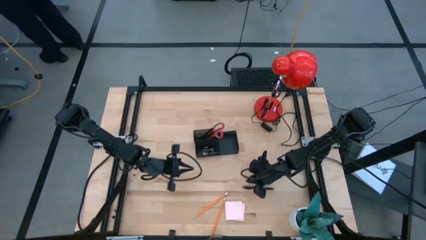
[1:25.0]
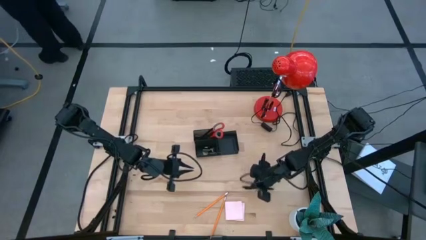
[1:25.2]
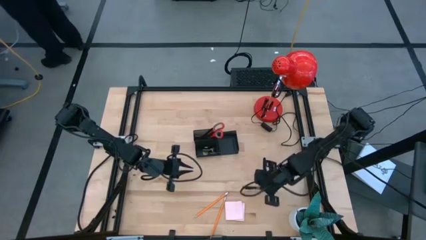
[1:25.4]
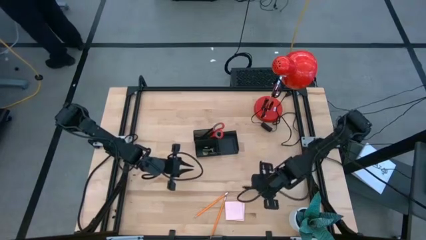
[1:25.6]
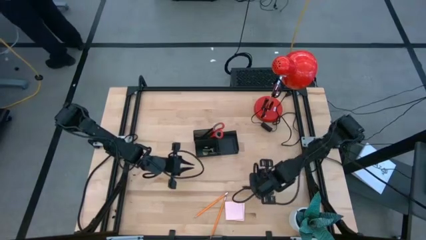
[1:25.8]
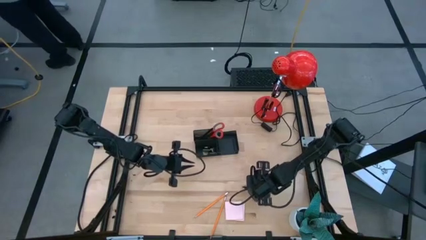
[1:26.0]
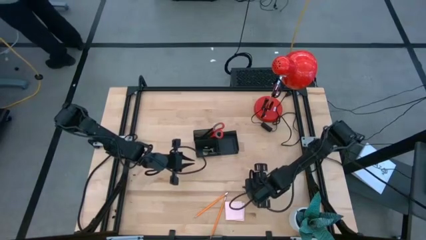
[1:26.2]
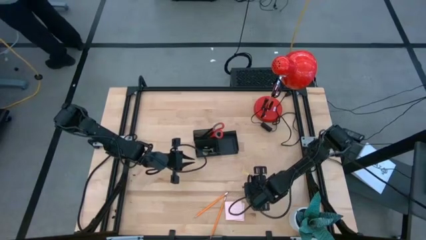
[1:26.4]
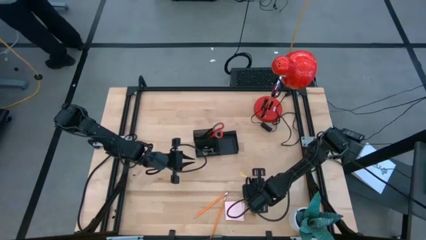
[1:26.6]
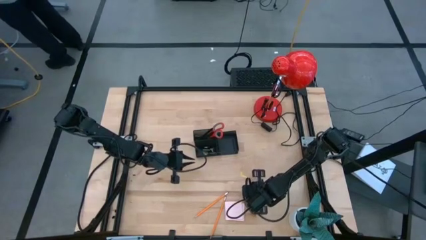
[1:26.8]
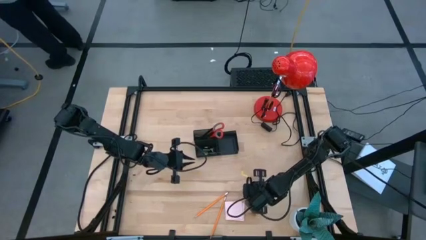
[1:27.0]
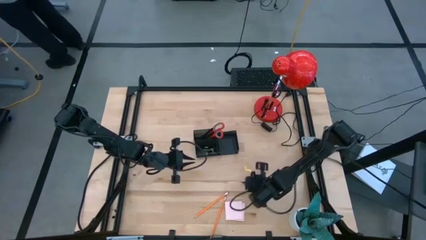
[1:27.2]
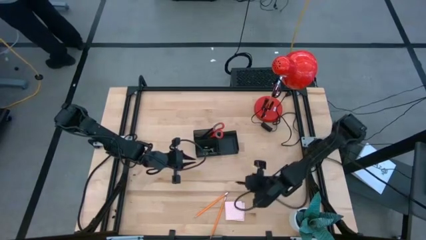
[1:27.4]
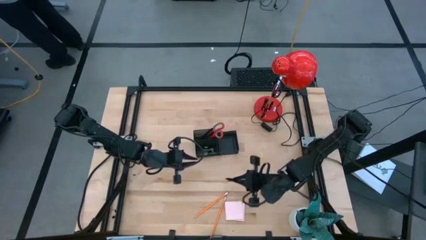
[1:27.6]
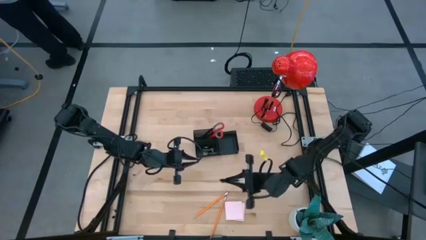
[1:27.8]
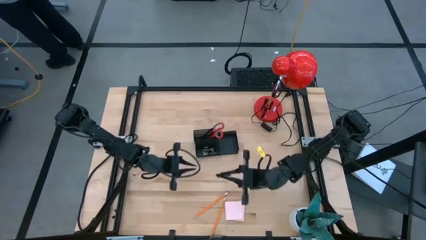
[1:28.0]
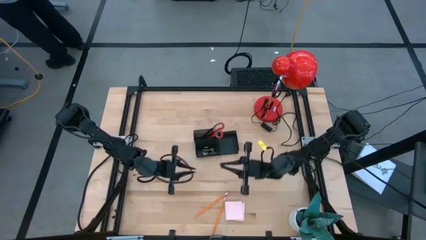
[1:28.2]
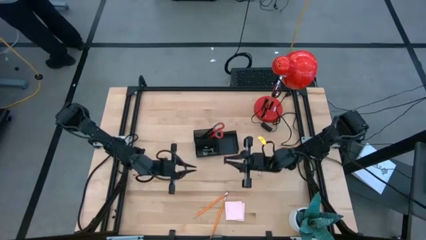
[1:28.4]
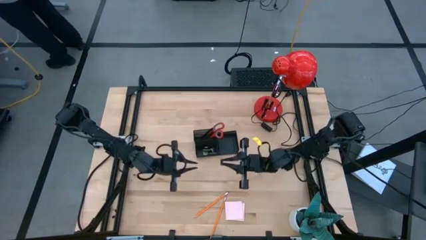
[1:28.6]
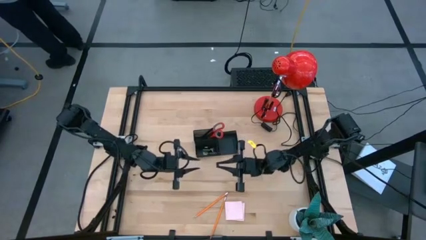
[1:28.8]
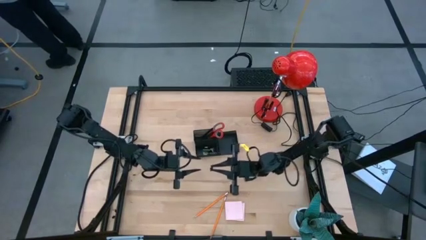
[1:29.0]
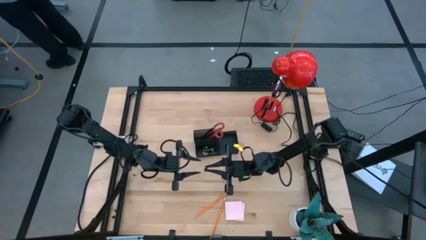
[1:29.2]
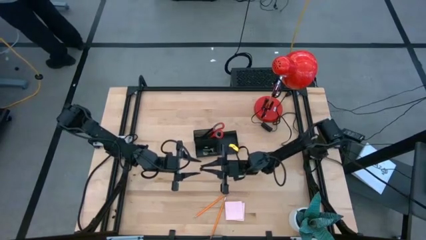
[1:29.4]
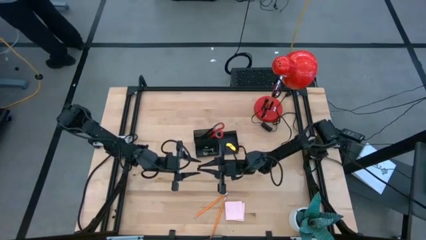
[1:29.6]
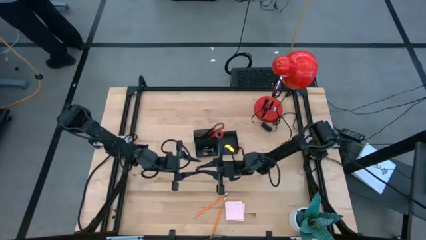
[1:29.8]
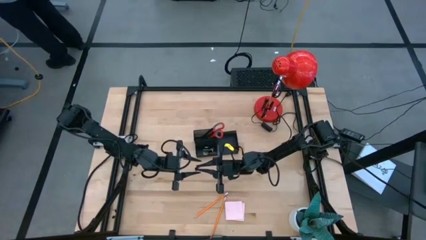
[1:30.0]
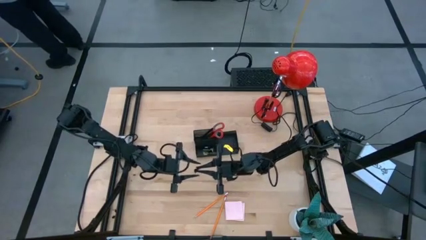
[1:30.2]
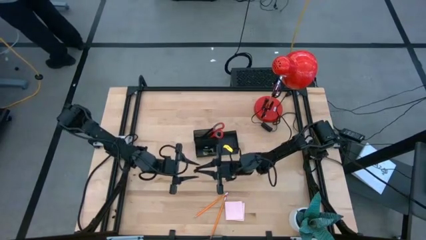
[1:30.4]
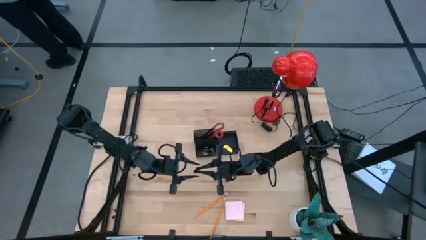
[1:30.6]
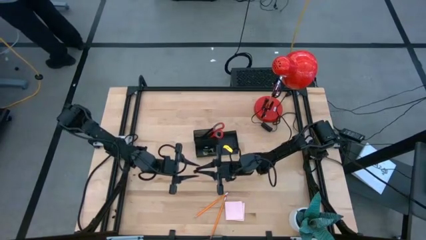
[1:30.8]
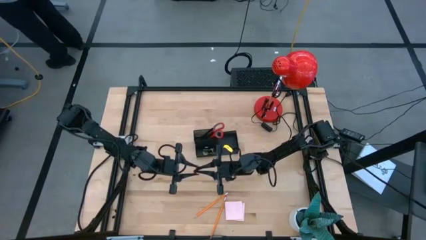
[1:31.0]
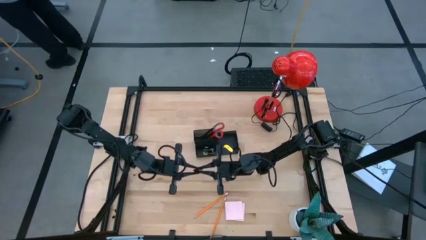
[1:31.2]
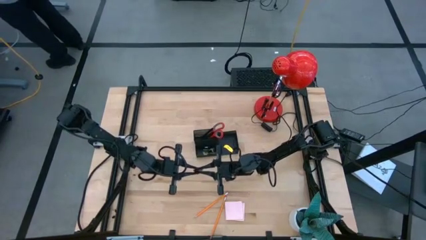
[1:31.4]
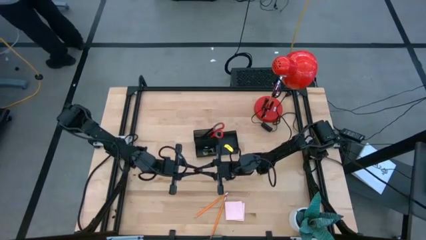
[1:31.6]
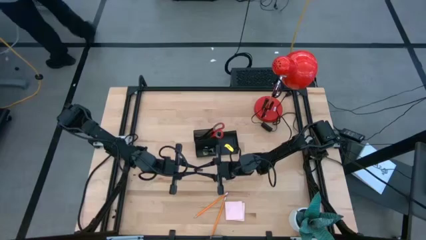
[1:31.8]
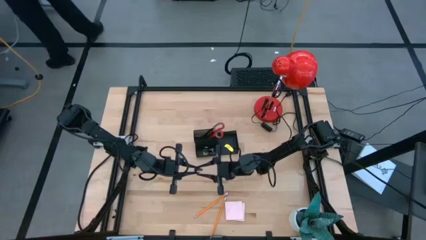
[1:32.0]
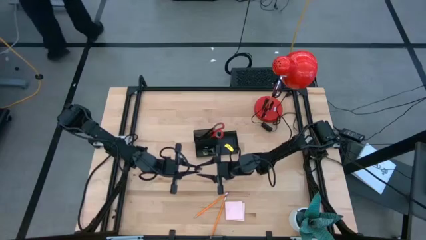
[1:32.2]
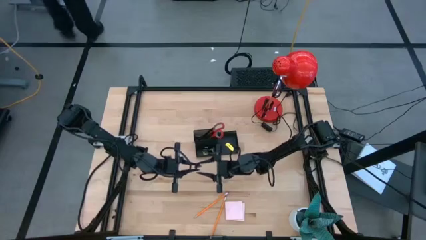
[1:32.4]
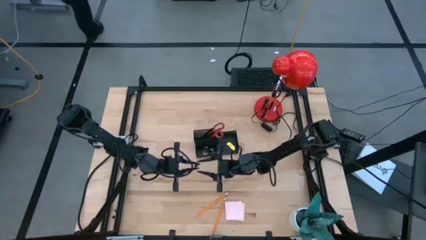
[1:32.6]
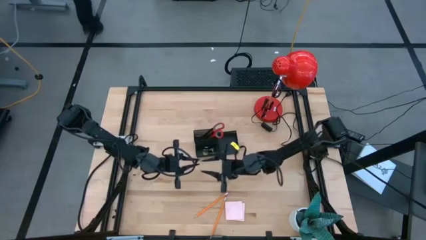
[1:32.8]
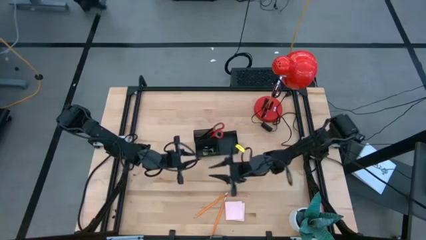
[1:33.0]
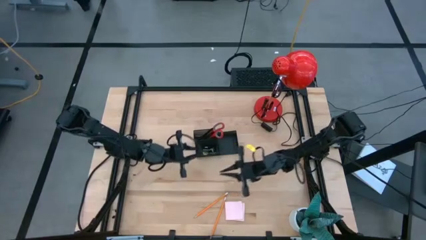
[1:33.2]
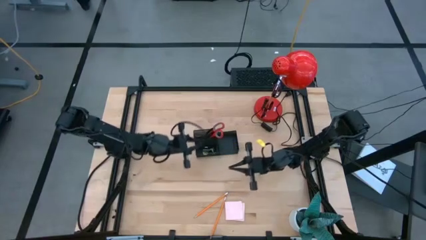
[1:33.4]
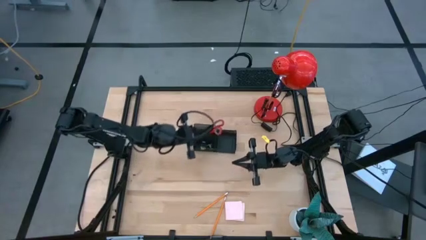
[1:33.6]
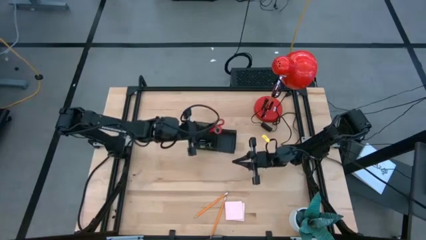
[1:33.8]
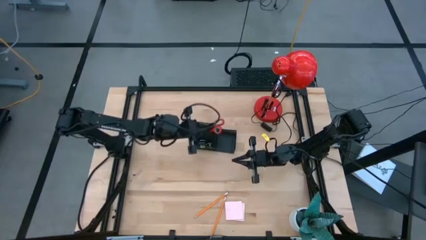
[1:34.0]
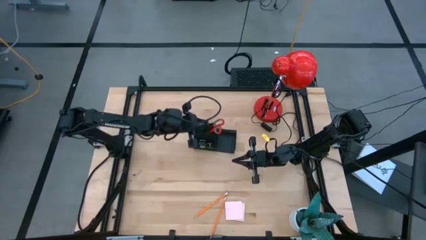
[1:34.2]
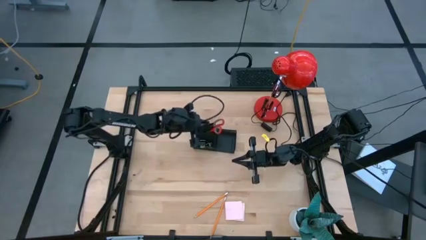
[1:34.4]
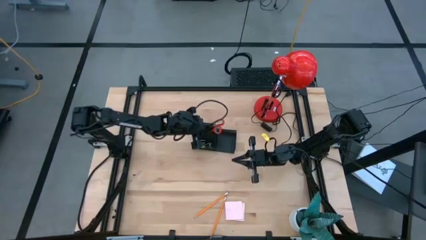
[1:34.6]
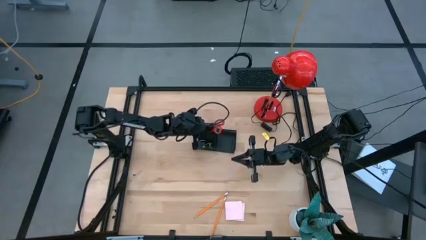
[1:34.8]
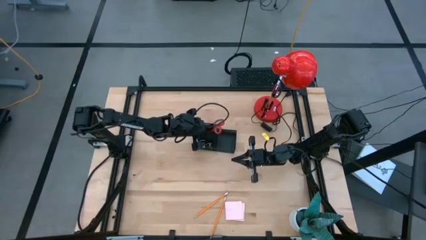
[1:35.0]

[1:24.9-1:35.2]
Task: Pick and place office supplies into organizer
Put the pen into the desk organizer

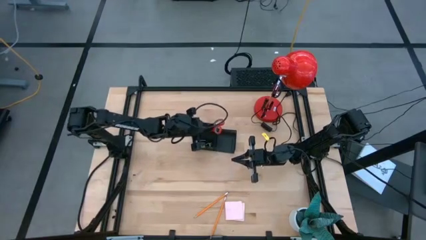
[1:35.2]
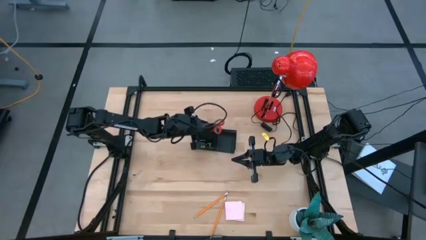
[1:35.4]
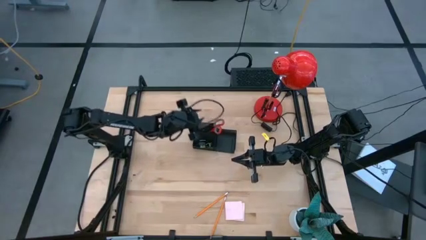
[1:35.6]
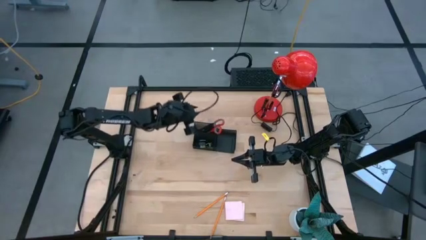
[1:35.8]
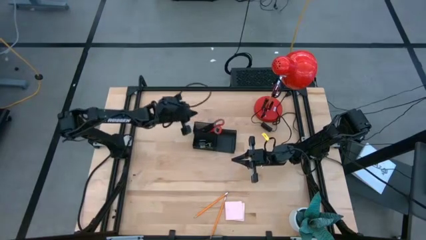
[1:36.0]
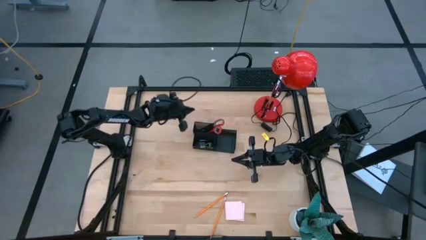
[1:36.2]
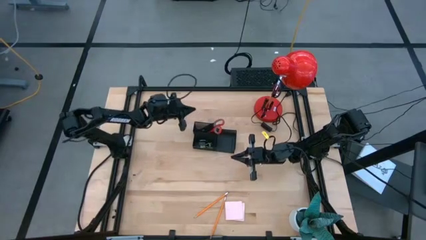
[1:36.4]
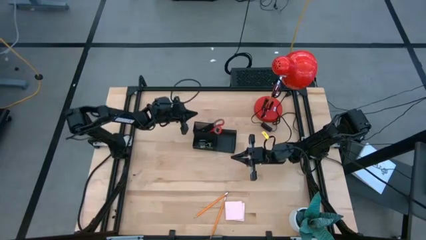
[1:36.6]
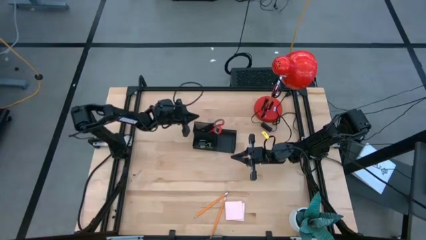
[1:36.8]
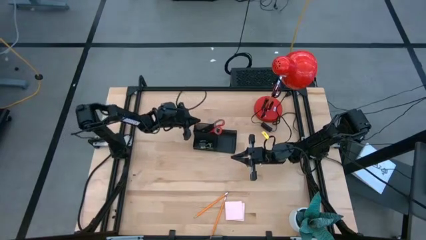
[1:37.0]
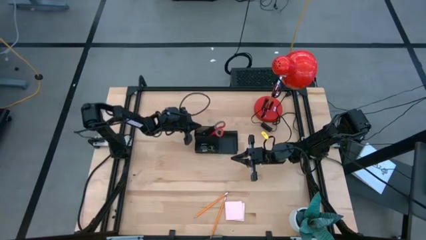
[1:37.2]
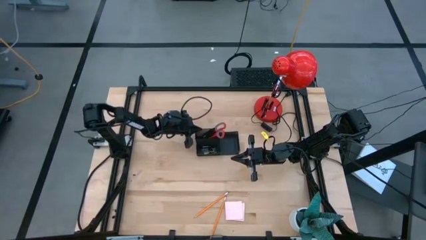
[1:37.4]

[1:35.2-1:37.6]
Adjust the desk organizer
